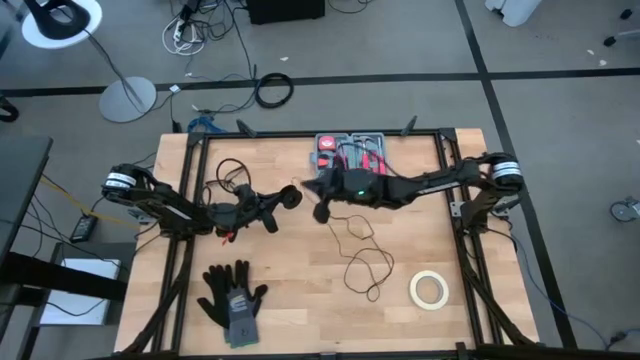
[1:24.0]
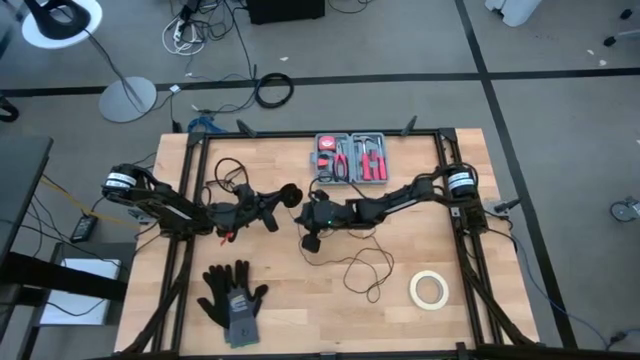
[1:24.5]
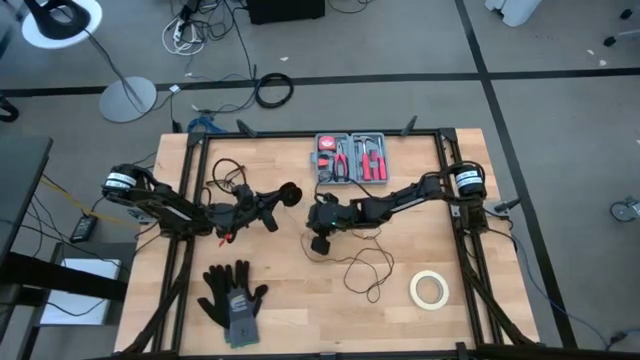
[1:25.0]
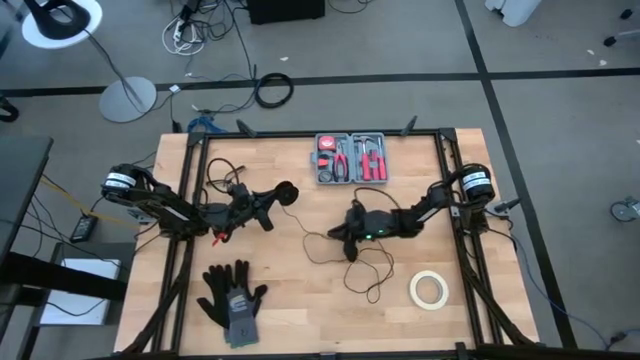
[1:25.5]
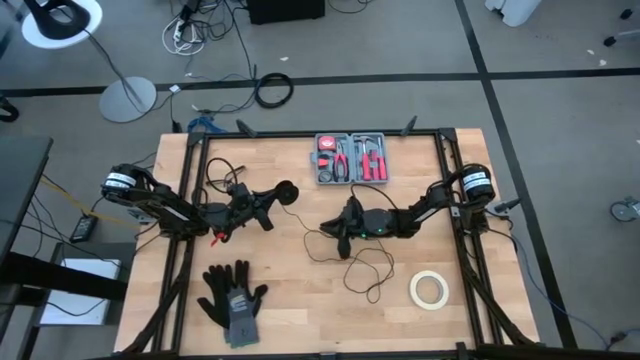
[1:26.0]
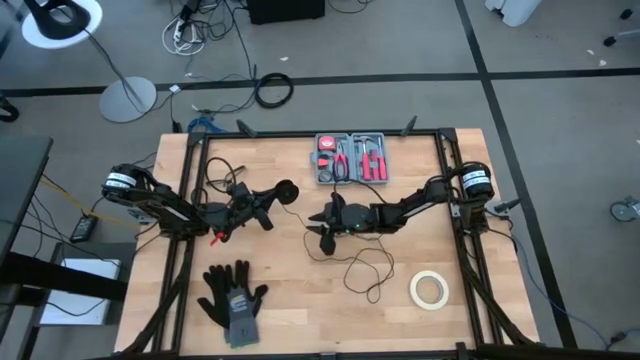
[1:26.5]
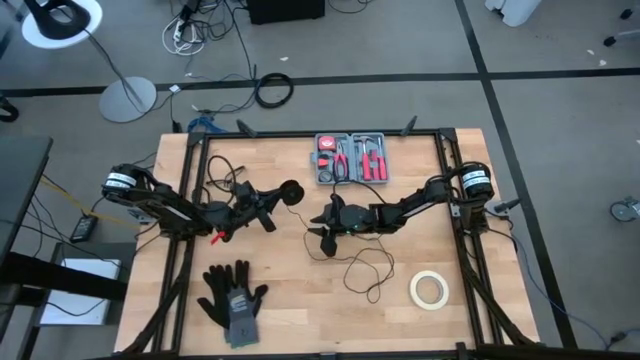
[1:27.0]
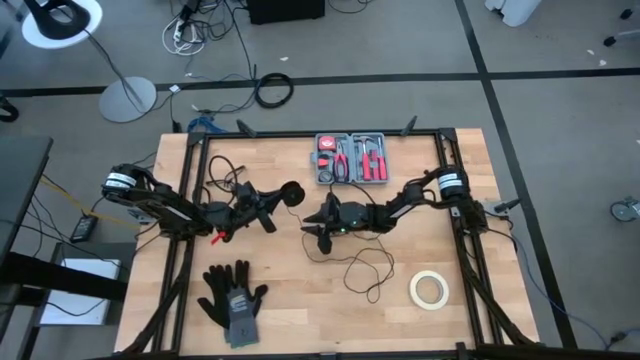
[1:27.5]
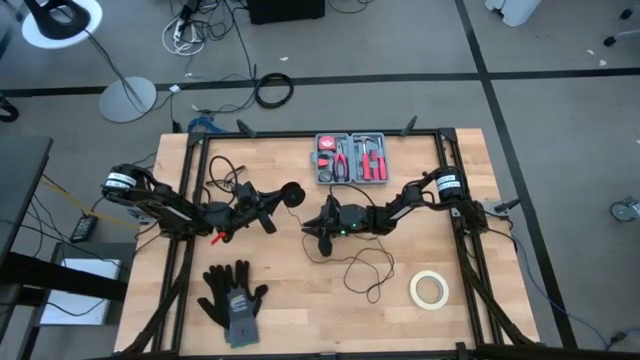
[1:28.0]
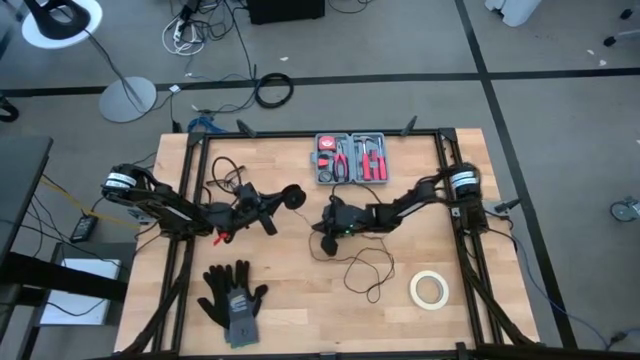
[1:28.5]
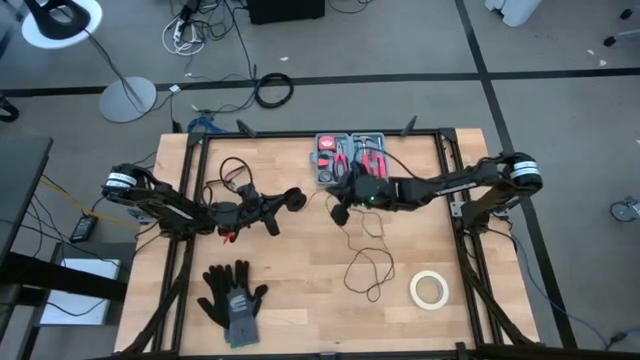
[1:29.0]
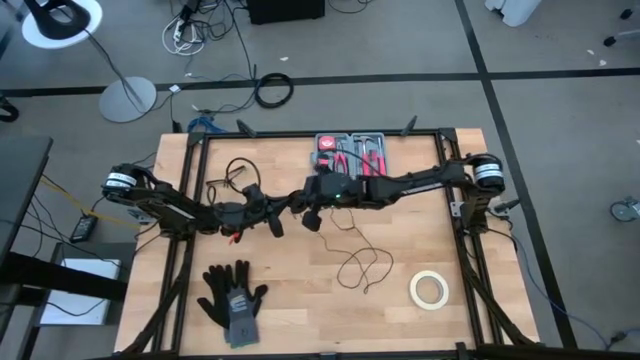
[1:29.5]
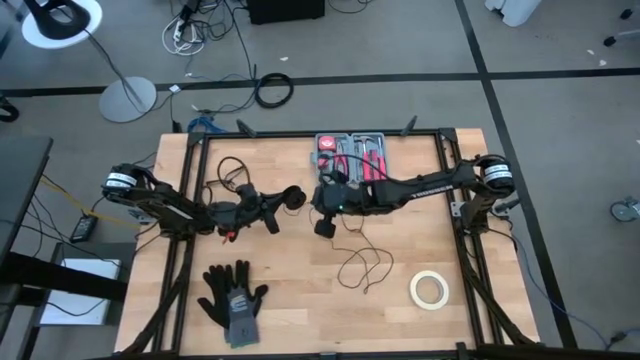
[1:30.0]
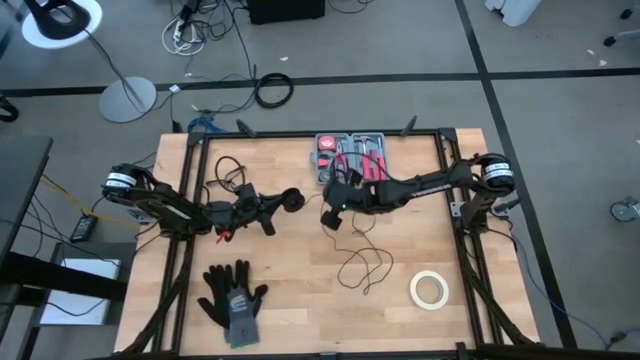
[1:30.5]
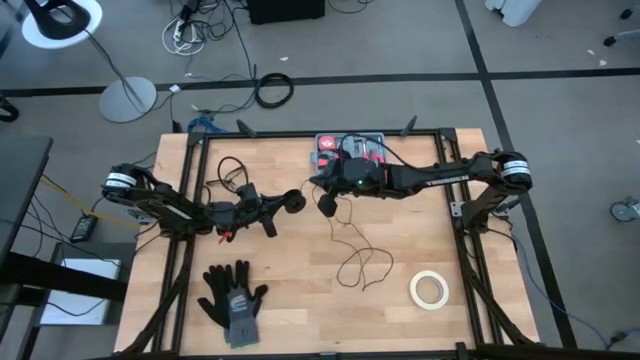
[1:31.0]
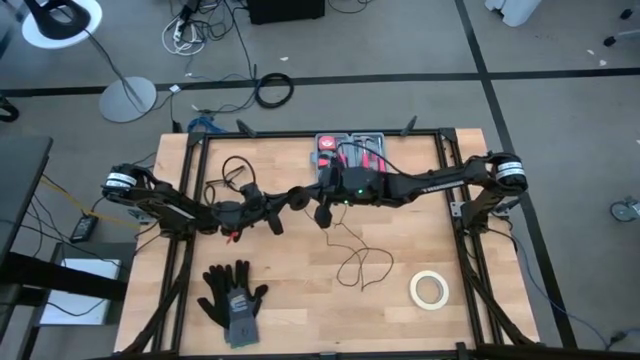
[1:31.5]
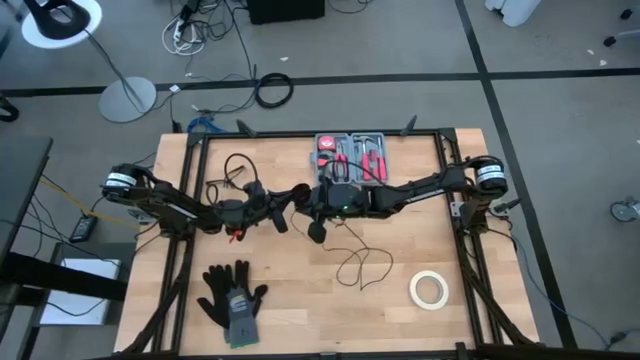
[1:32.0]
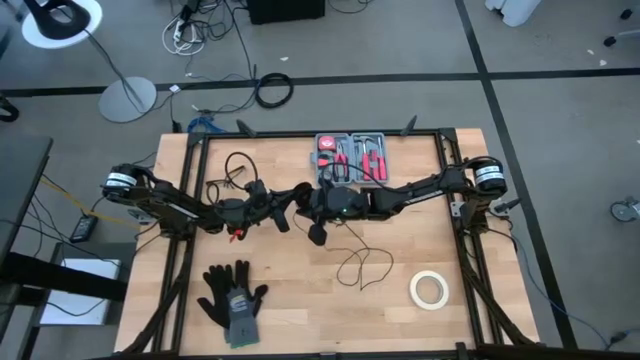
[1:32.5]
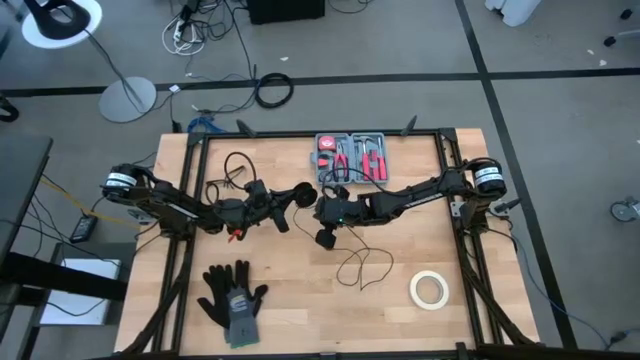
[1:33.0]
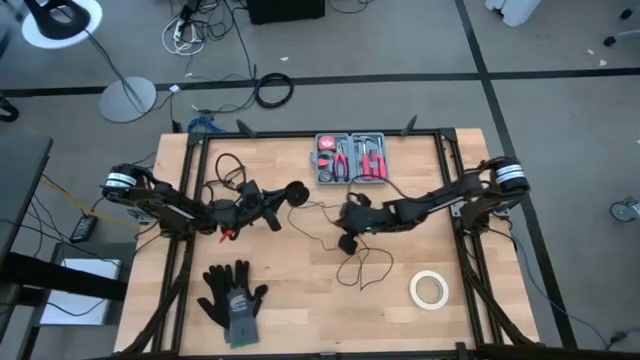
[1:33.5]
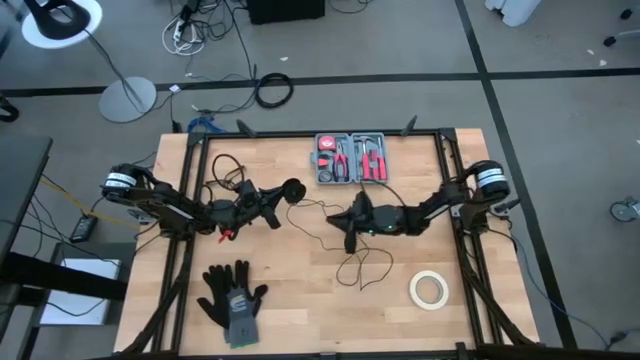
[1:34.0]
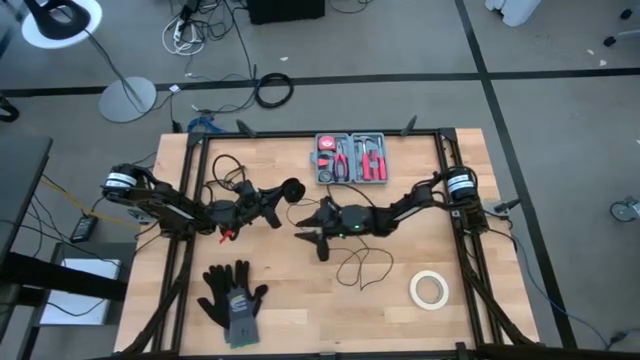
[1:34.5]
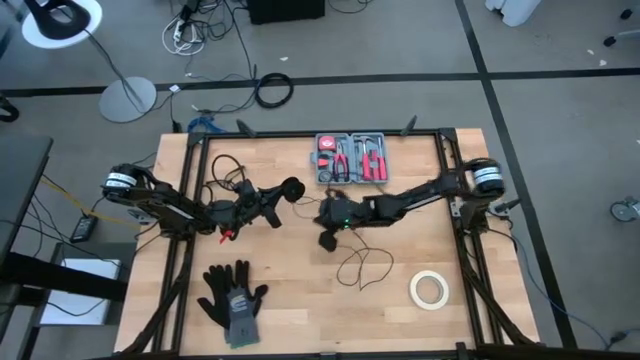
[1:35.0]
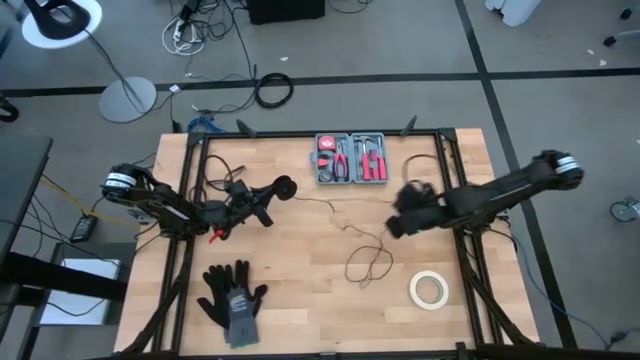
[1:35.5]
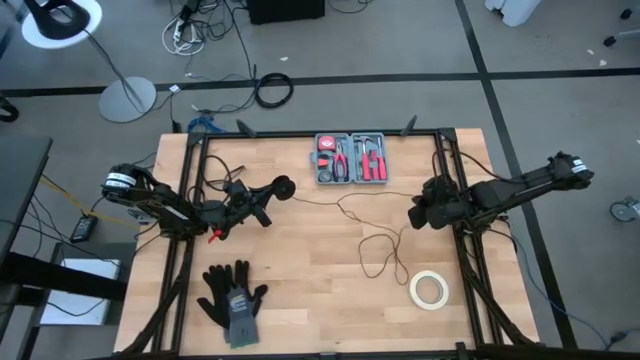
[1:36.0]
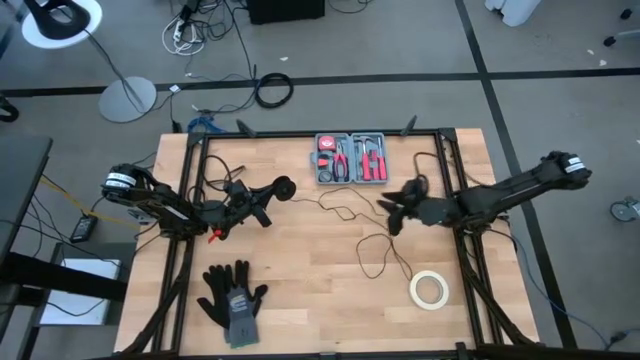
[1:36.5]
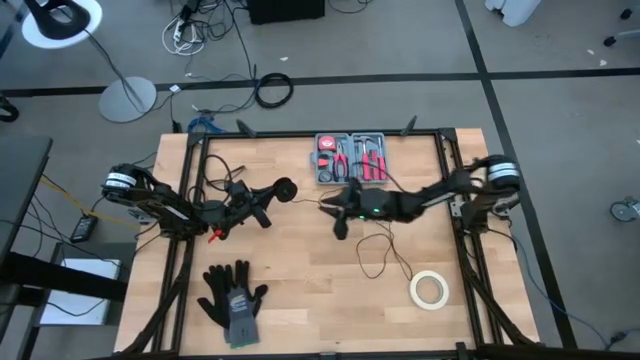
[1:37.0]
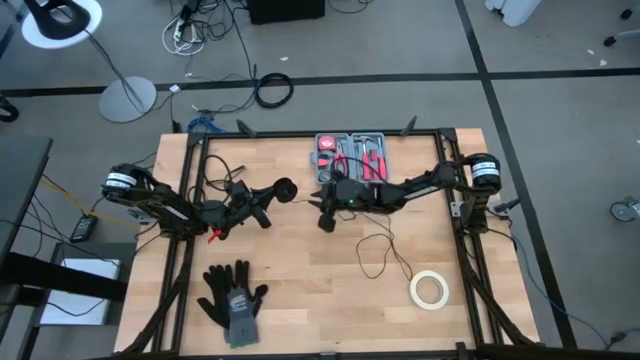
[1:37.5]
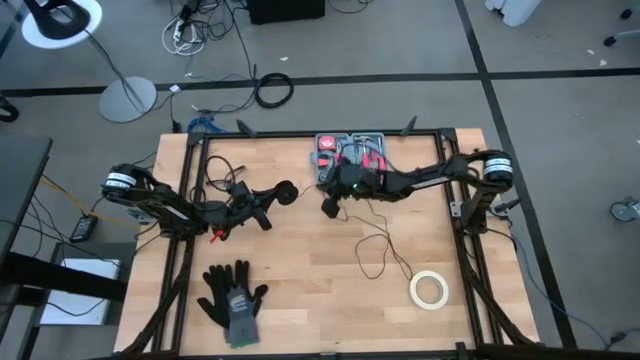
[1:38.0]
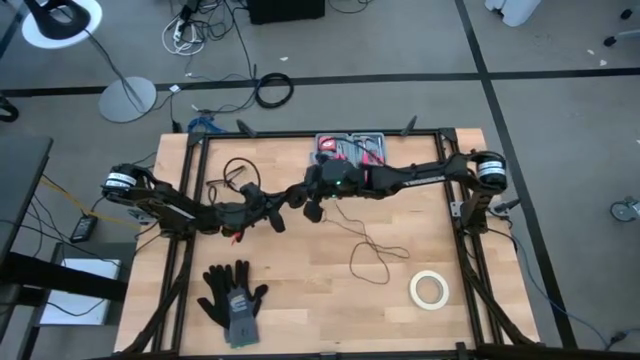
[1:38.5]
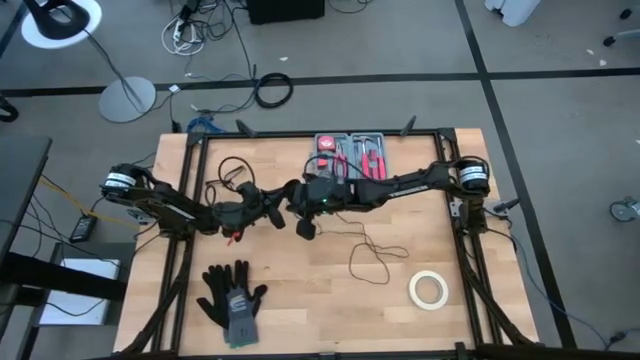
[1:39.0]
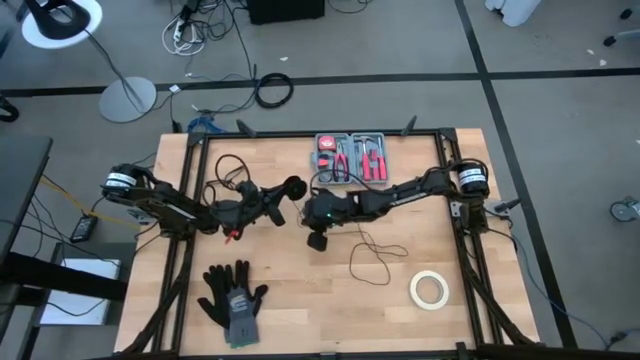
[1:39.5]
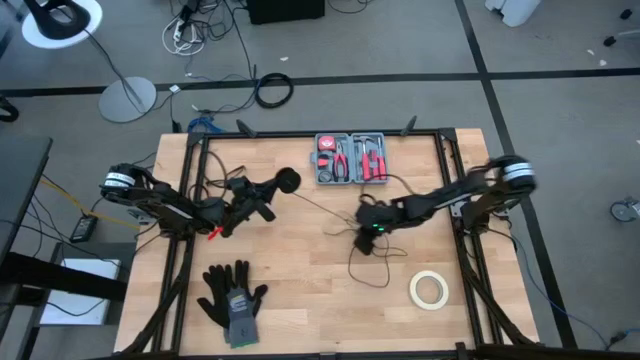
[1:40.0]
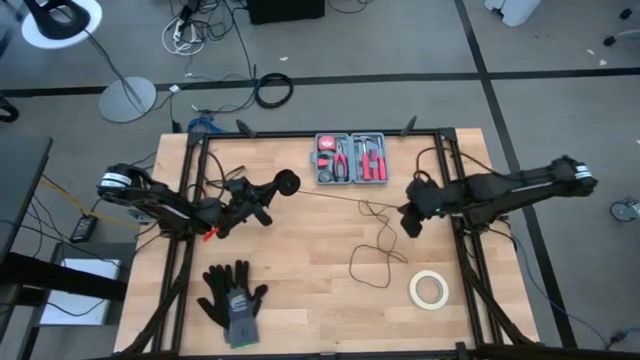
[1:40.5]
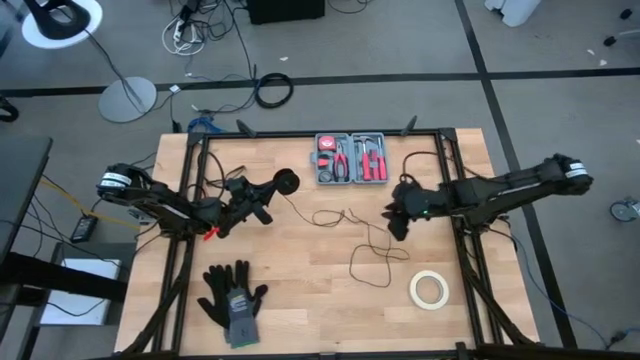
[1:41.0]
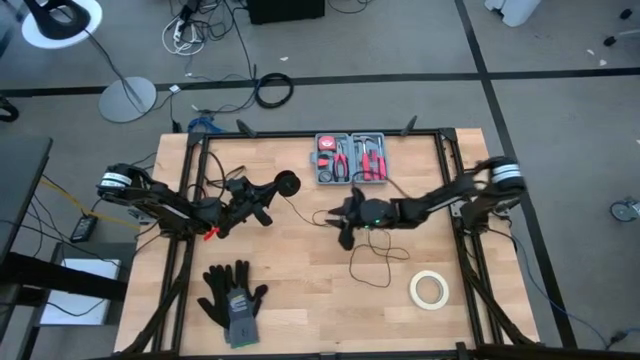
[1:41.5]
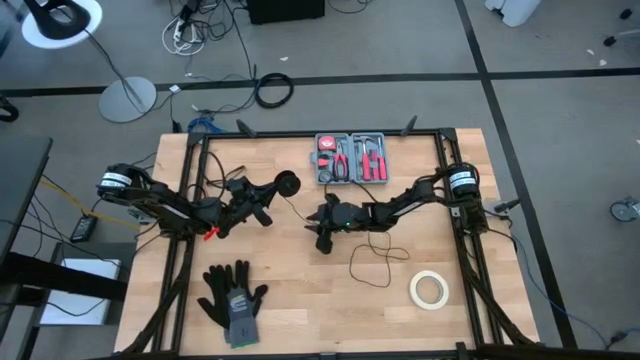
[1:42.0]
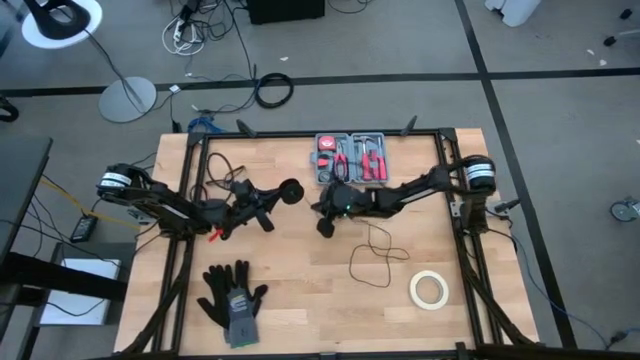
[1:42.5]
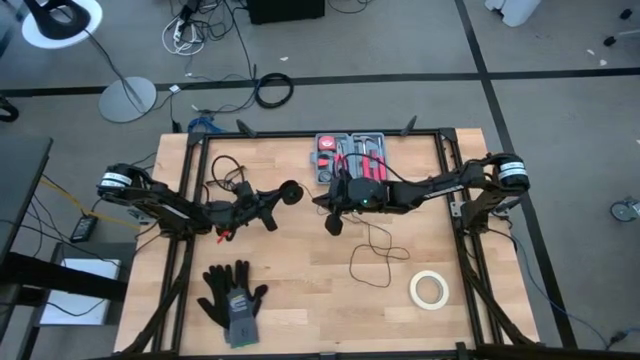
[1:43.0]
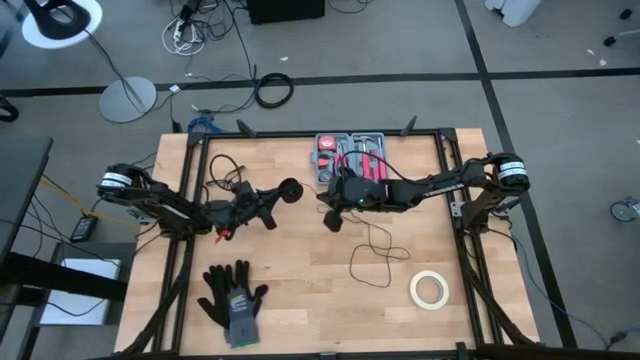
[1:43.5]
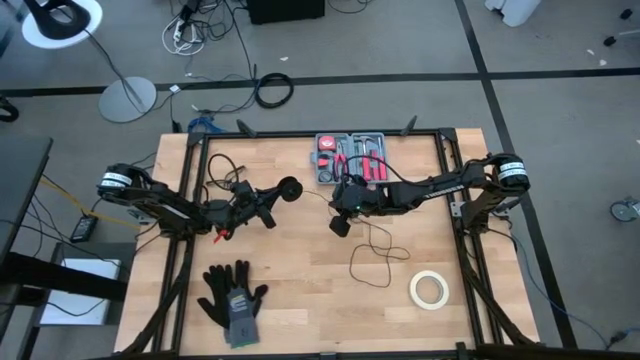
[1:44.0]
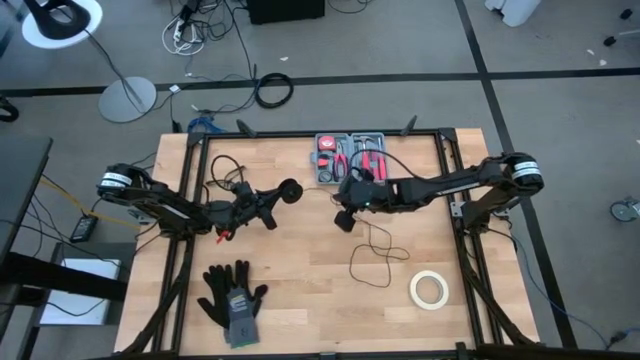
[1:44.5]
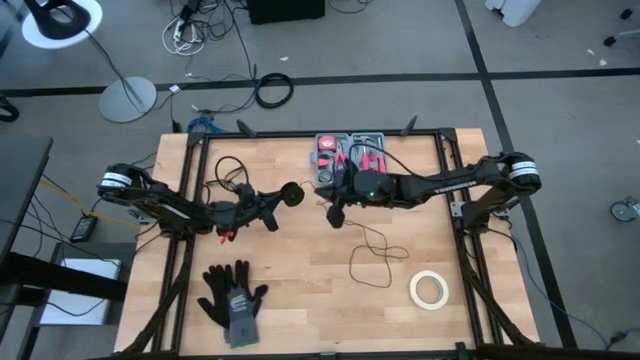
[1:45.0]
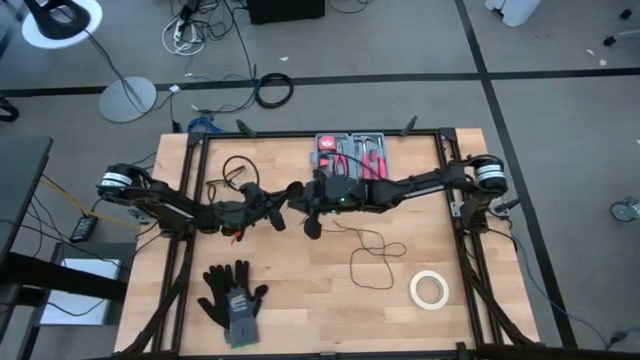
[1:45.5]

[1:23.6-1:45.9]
Task: Coil cords
Coil the black wire onto the black spool
